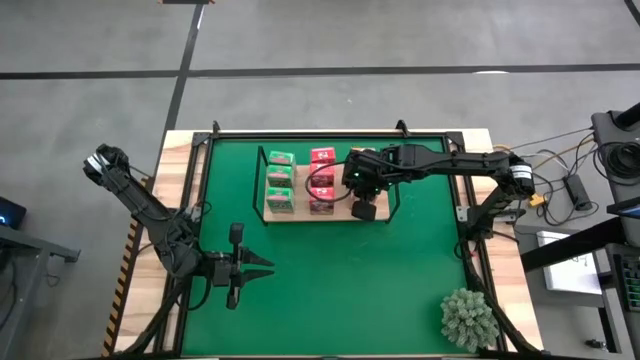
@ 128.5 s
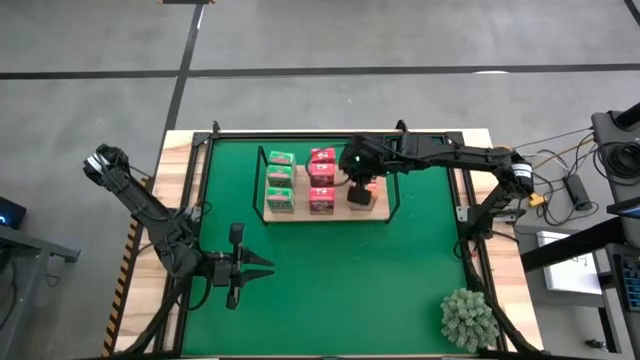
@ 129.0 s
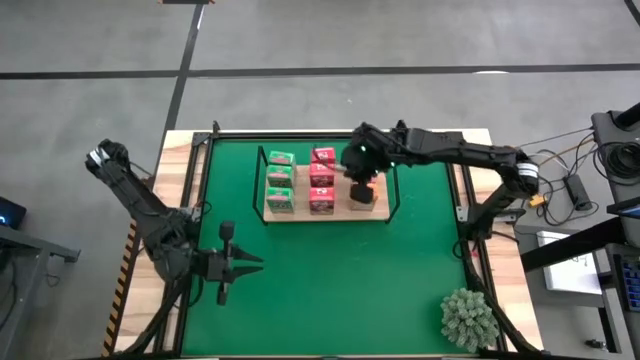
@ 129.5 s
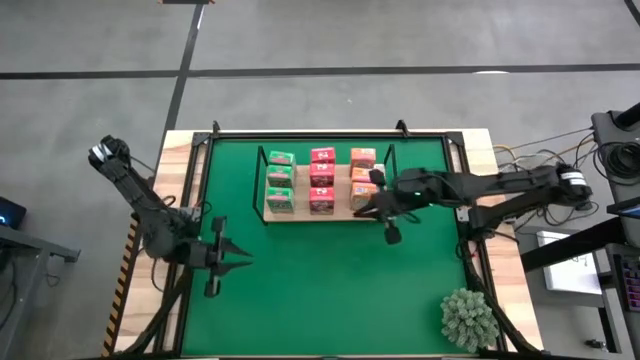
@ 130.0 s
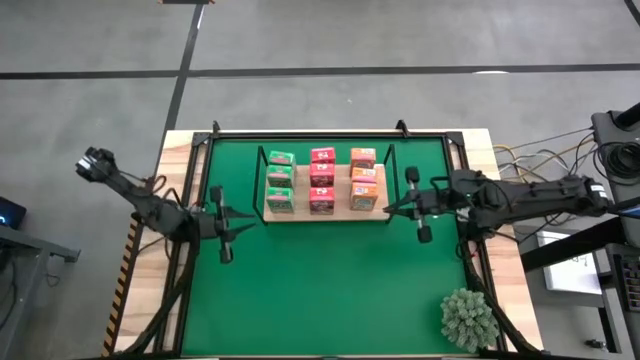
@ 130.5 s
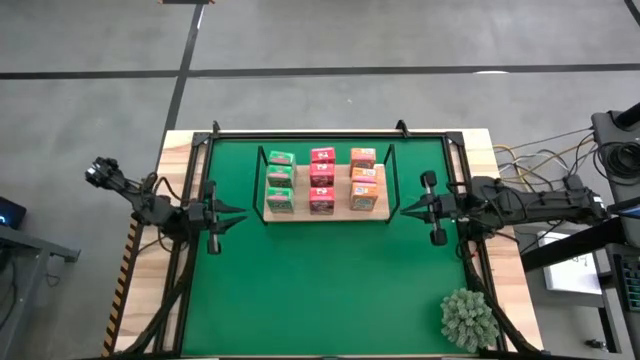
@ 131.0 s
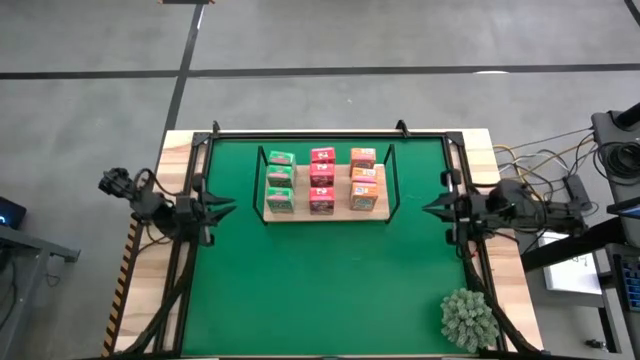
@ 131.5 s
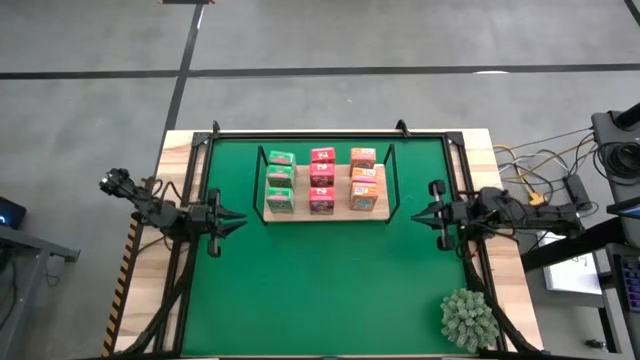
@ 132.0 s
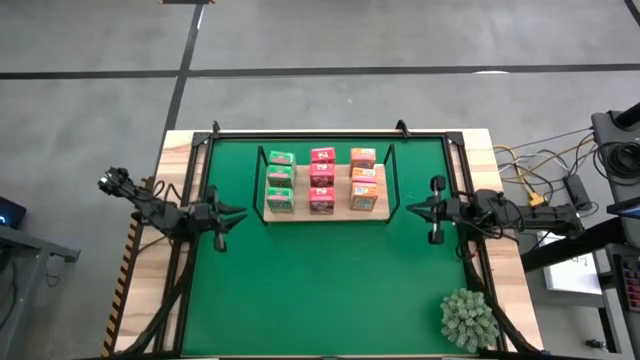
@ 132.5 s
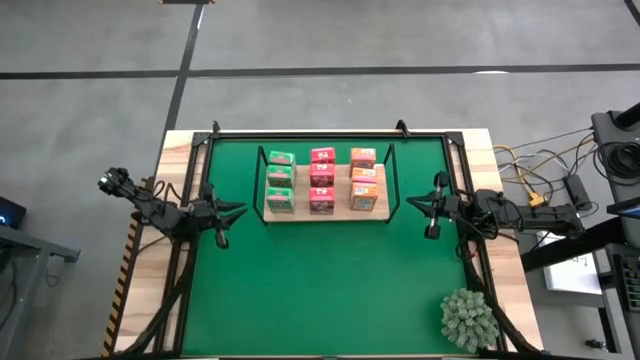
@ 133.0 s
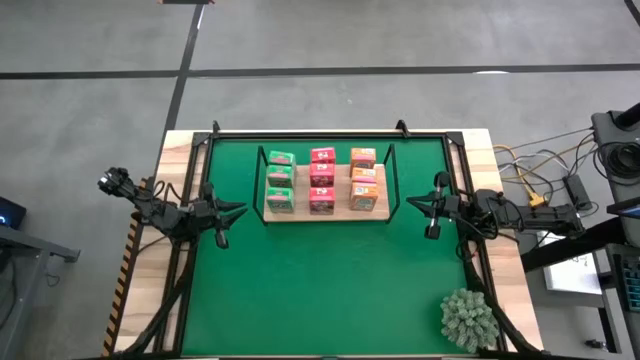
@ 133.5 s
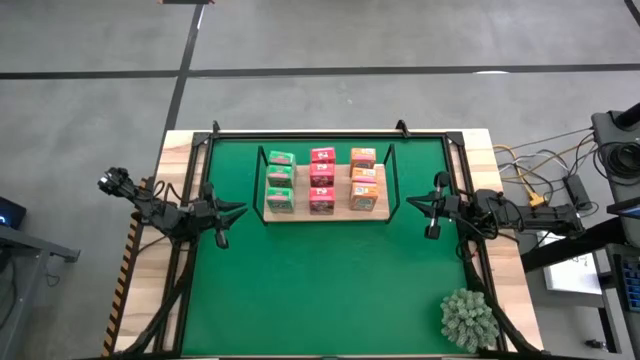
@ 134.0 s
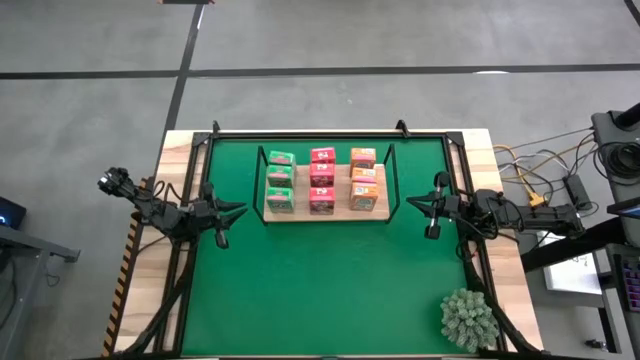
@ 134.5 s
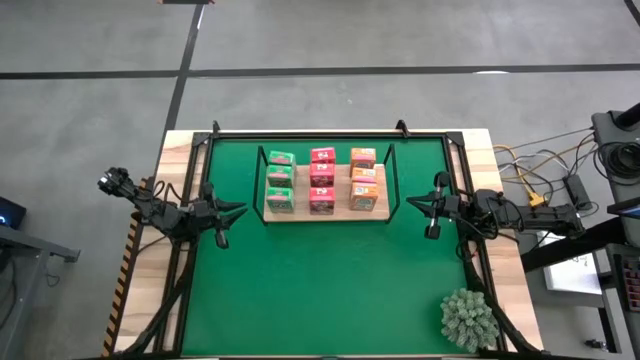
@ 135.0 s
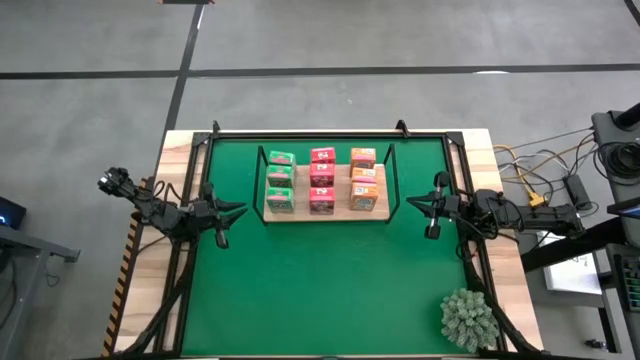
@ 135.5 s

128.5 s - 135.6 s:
Task: Stack cereal on shelf
Return to Home Position

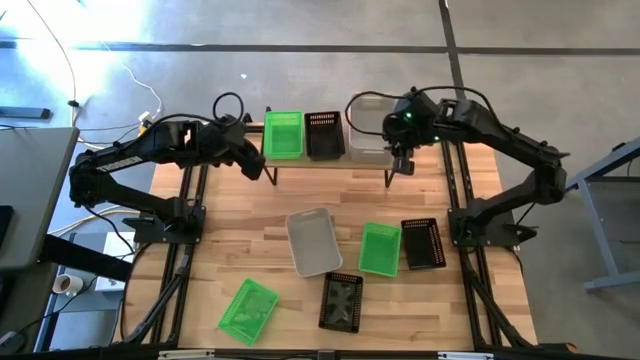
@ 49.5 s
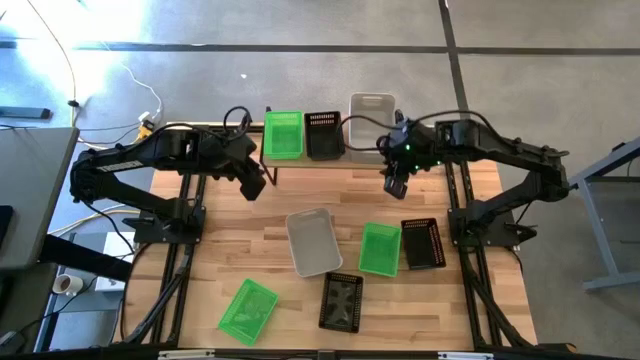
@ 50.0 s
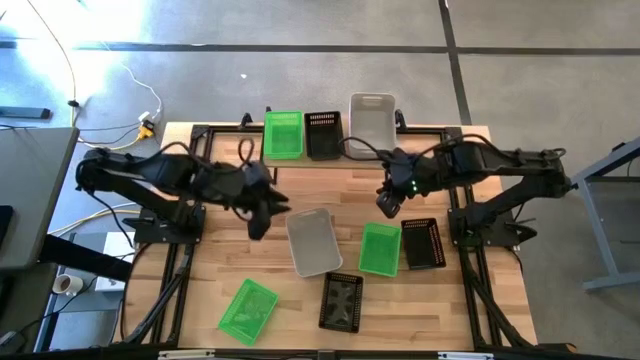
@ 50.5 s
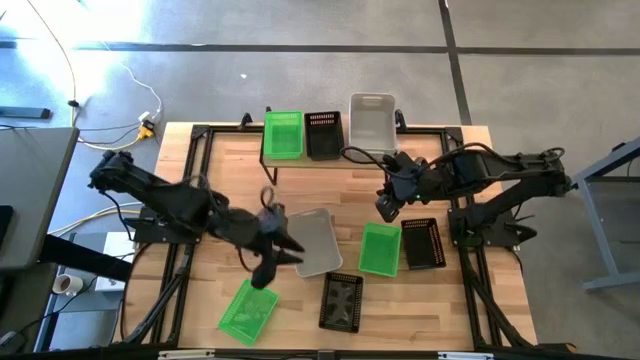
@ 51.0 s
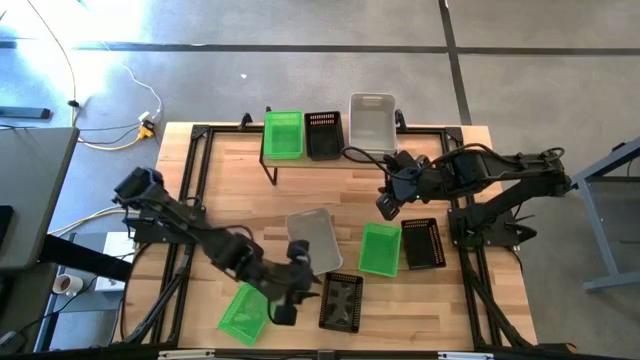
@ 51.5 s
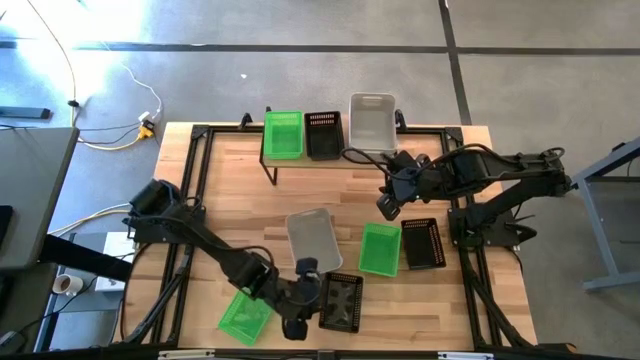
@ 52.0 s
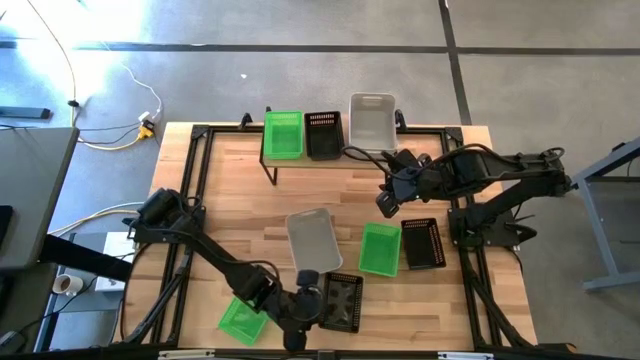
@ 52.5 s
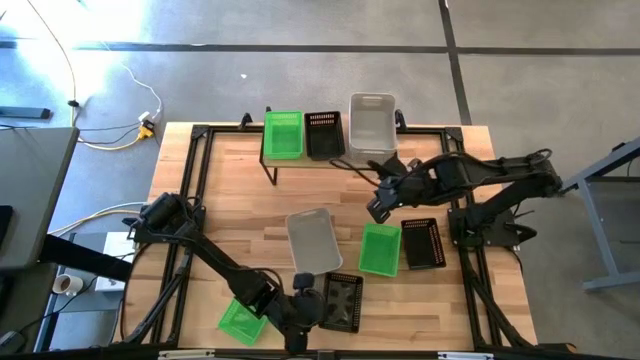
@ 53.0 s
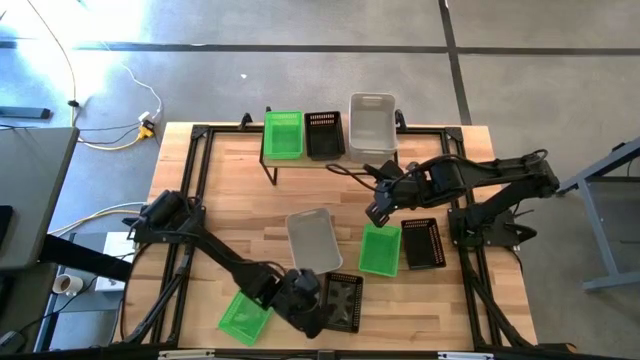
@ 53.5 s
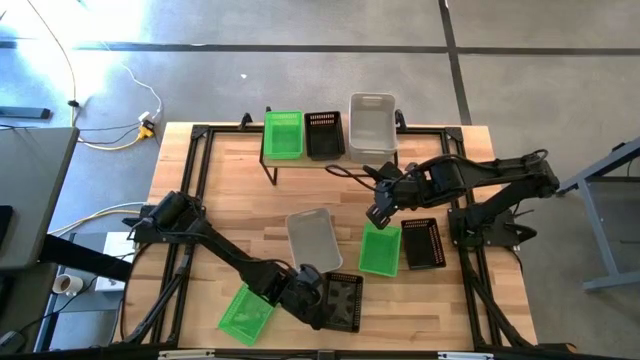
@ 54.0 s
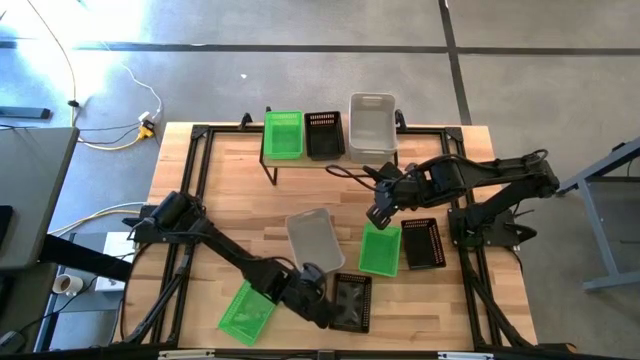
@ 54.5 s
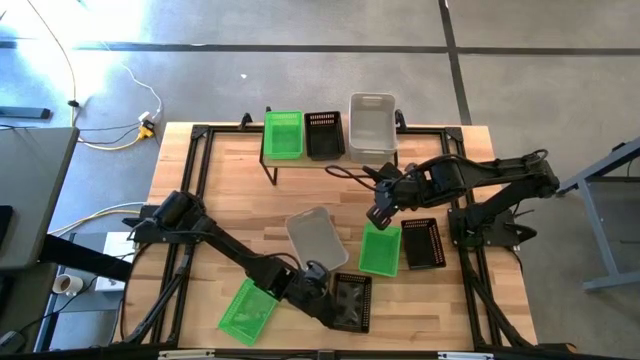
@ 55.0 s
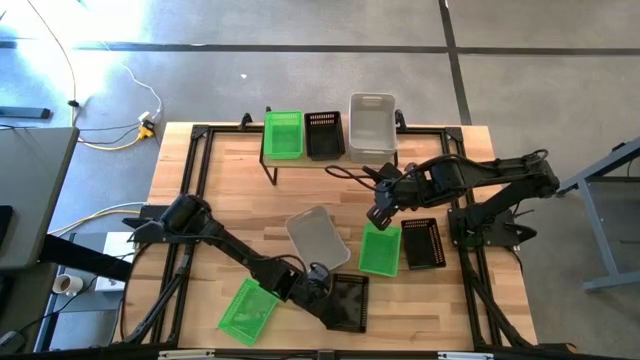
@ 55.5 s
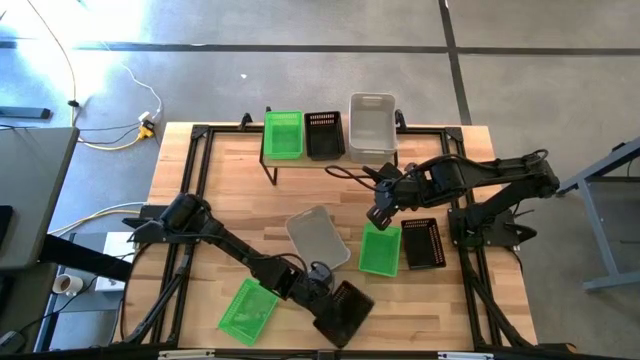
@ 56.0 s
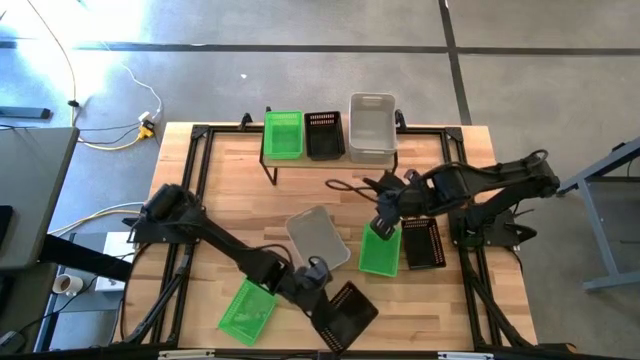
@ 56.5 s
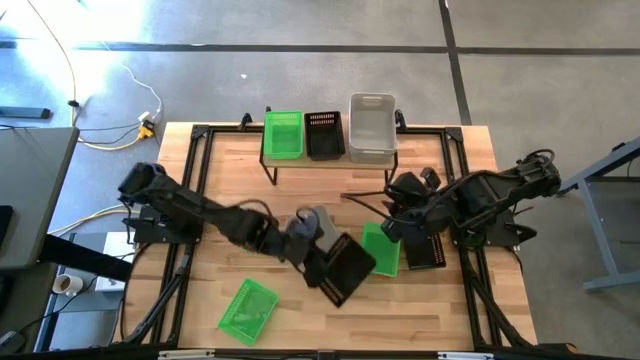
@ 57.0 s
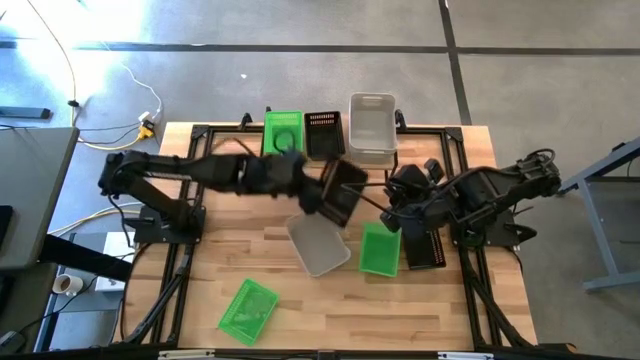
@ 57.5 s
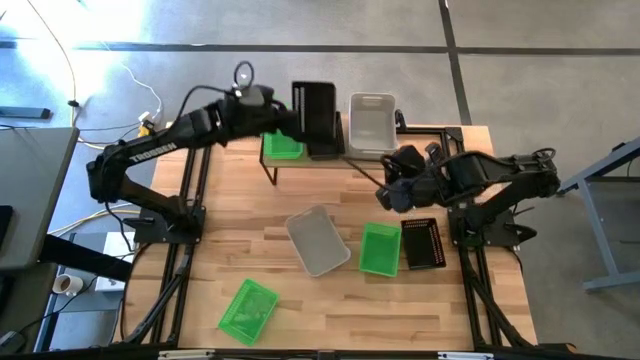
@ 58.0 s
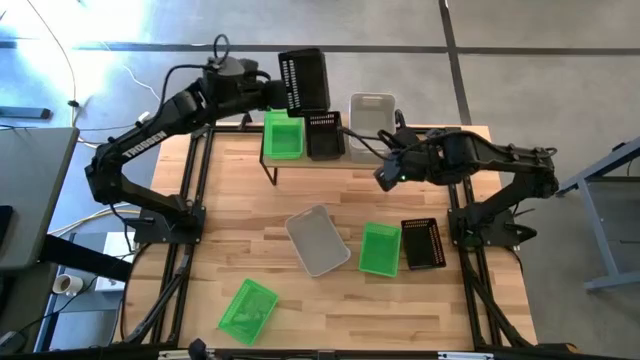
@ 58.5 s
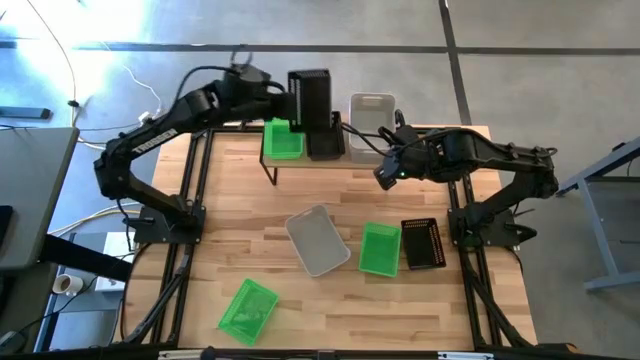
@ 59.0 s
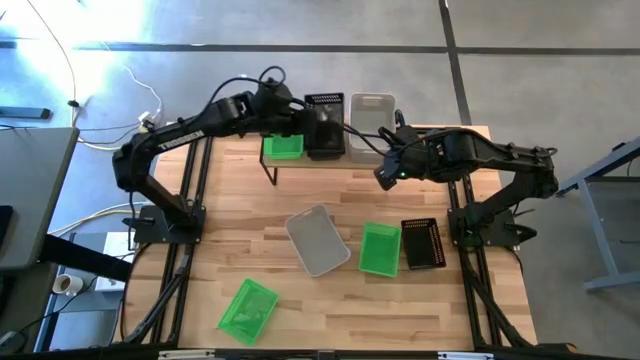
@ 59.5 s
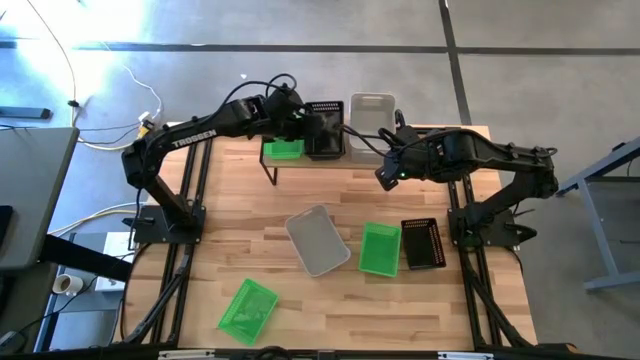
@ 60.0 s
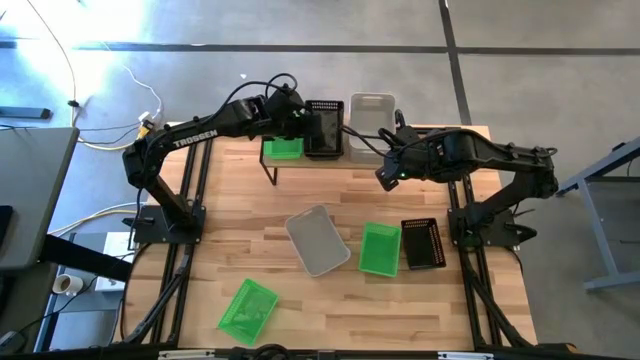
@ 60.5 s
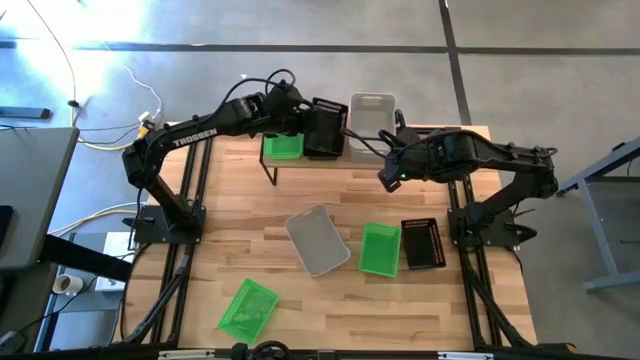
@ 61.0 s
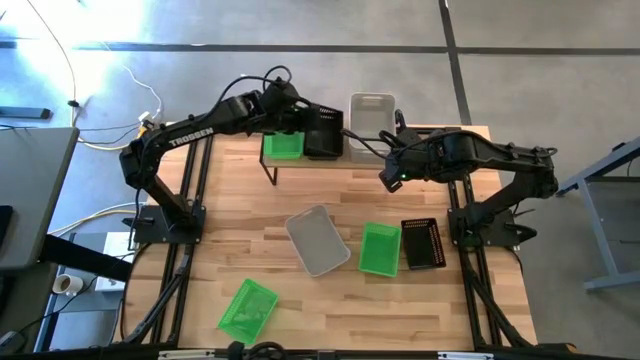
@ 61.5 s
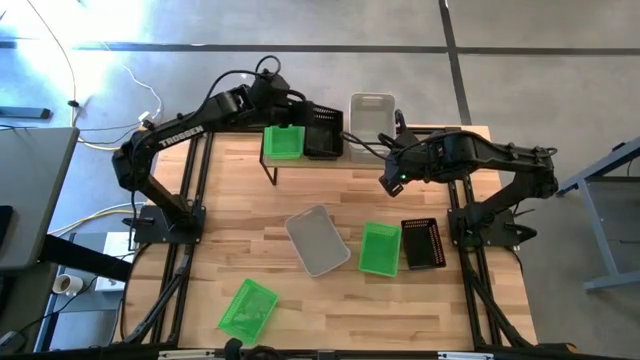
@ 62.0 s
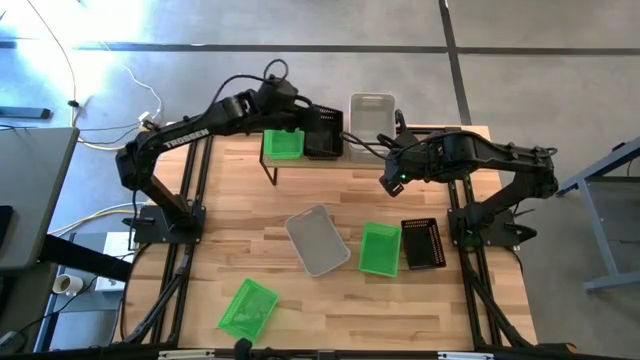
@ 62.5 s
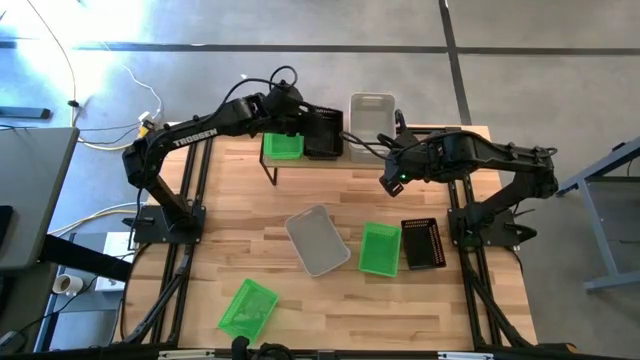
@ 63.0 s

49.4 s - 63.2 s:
Task: Stack baskets on shelf by color
Stack the bottom black bin on top of the black bin on the shelf
